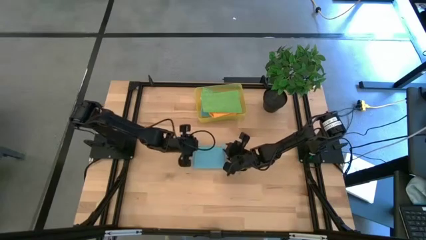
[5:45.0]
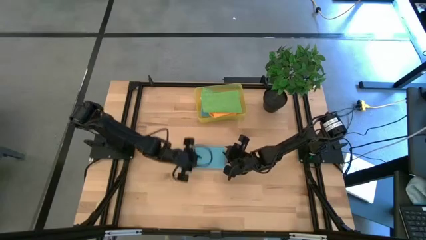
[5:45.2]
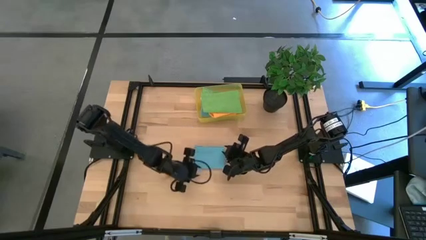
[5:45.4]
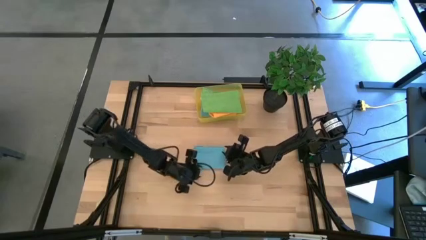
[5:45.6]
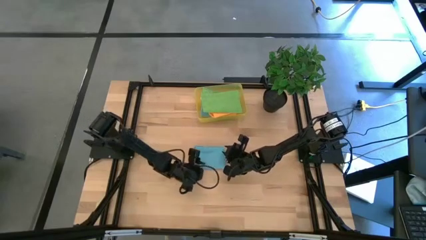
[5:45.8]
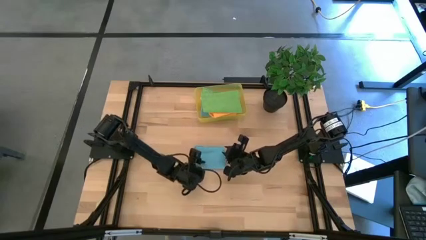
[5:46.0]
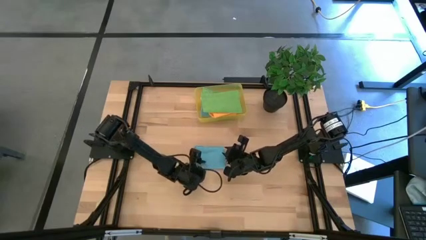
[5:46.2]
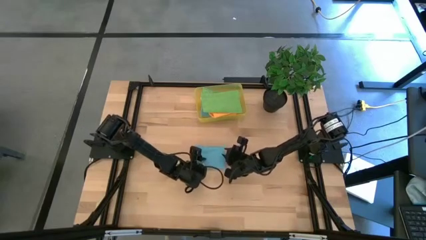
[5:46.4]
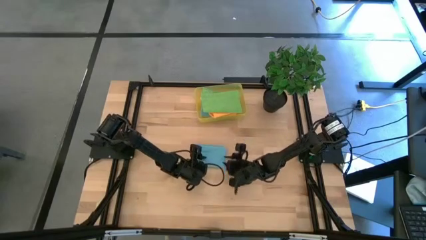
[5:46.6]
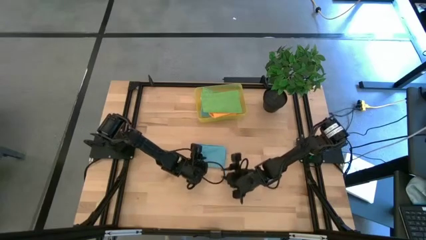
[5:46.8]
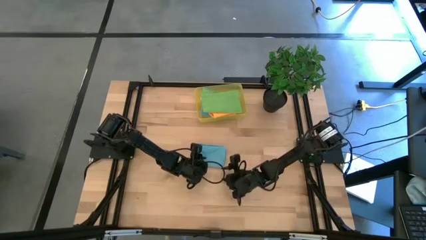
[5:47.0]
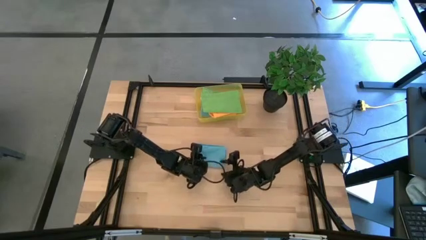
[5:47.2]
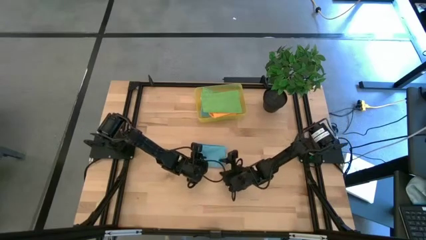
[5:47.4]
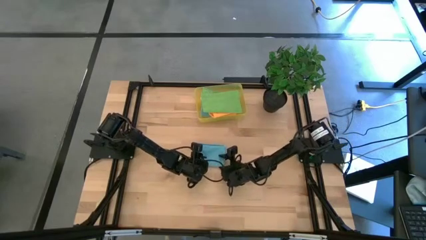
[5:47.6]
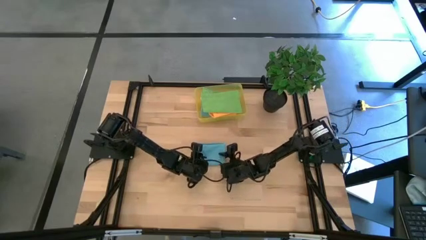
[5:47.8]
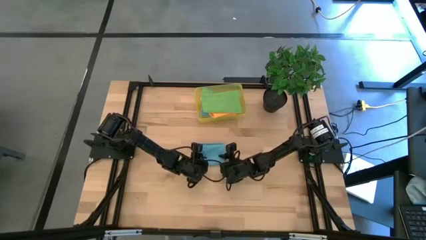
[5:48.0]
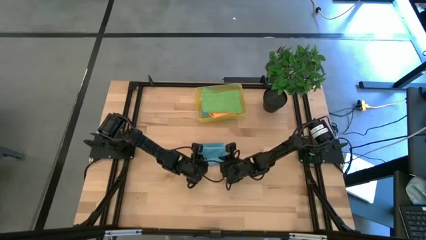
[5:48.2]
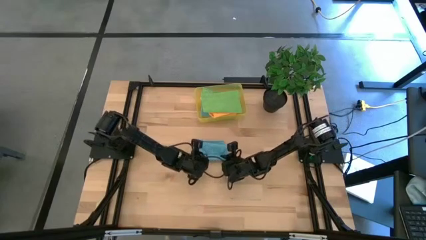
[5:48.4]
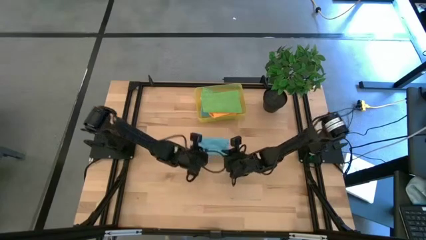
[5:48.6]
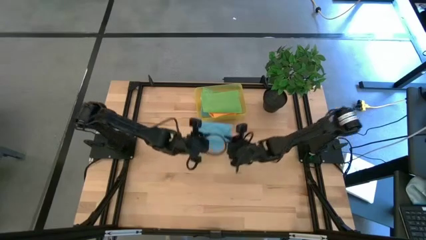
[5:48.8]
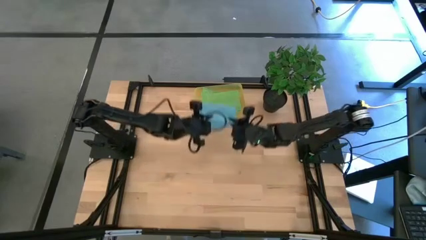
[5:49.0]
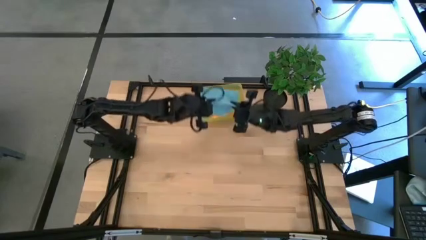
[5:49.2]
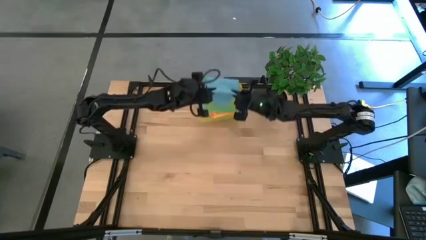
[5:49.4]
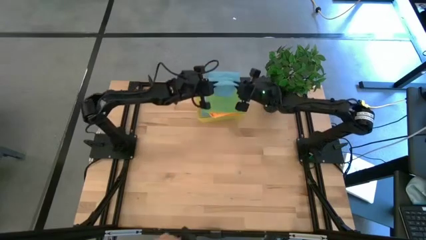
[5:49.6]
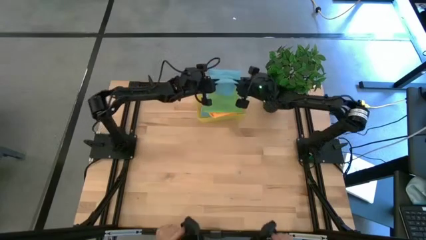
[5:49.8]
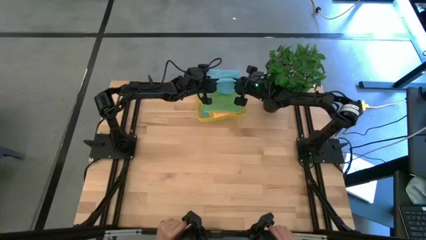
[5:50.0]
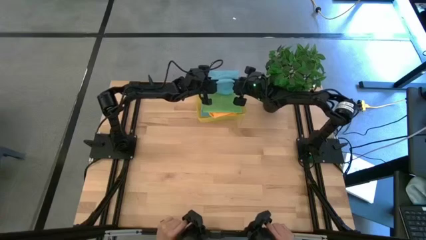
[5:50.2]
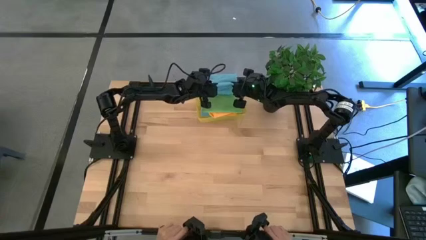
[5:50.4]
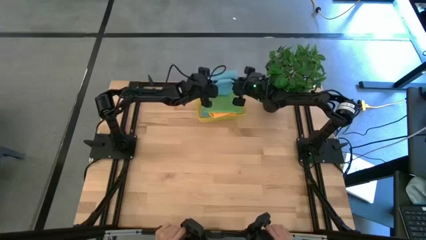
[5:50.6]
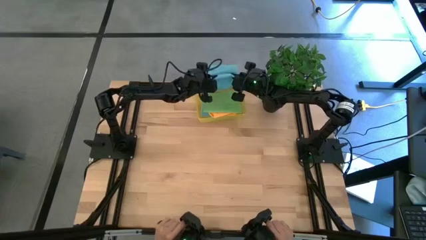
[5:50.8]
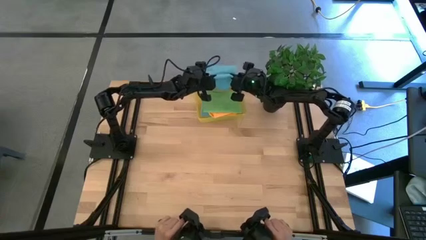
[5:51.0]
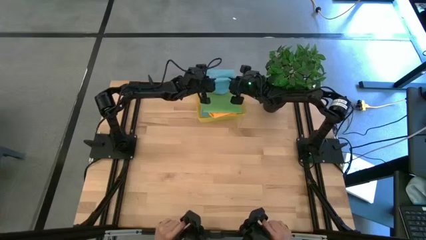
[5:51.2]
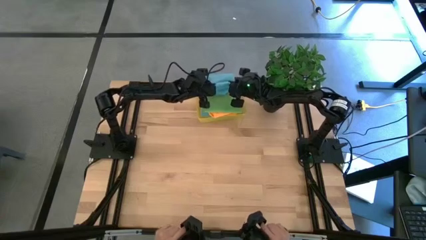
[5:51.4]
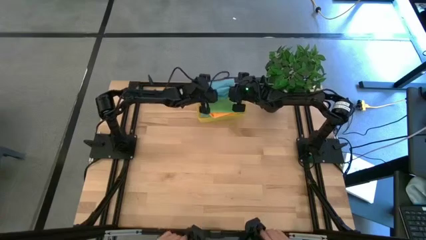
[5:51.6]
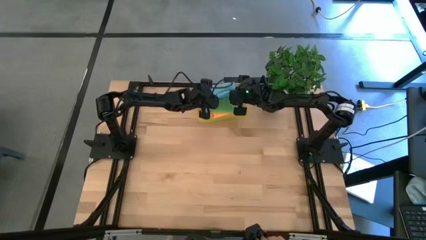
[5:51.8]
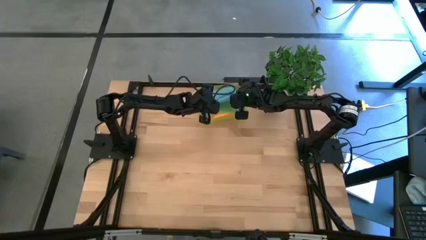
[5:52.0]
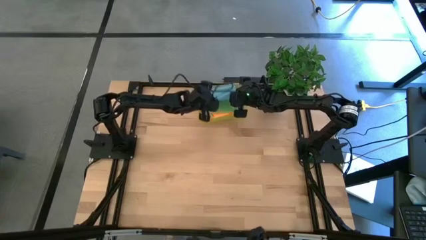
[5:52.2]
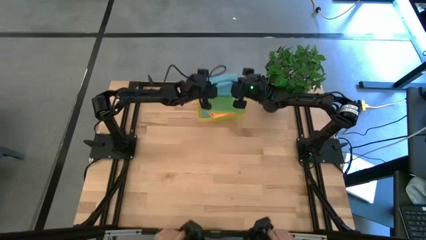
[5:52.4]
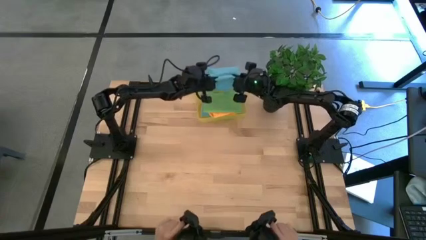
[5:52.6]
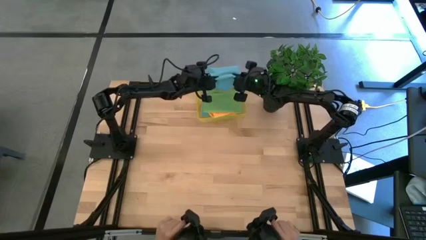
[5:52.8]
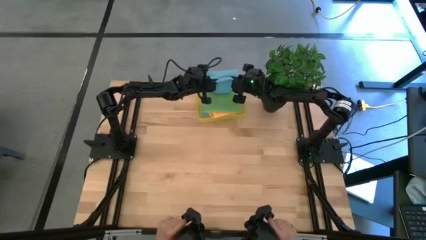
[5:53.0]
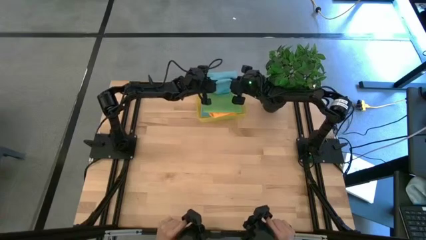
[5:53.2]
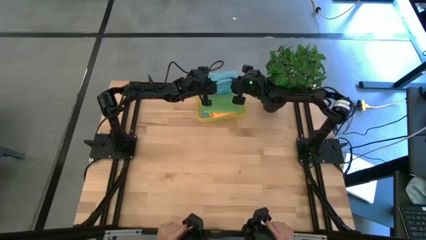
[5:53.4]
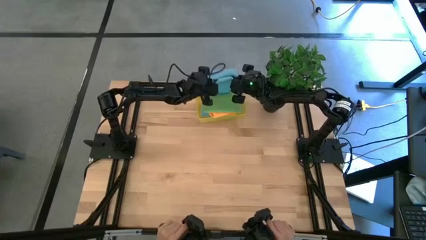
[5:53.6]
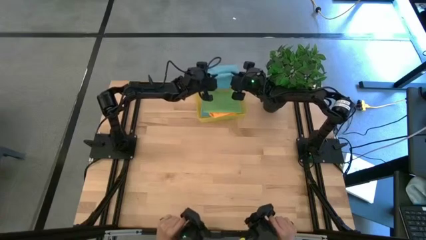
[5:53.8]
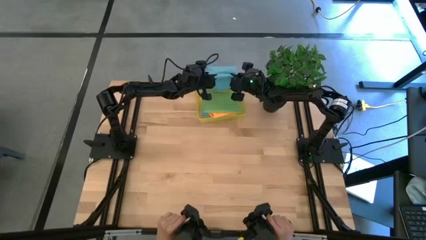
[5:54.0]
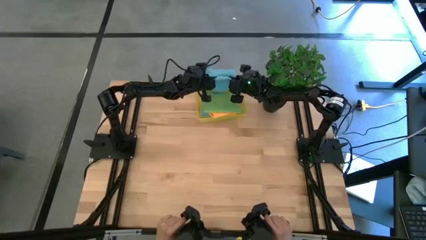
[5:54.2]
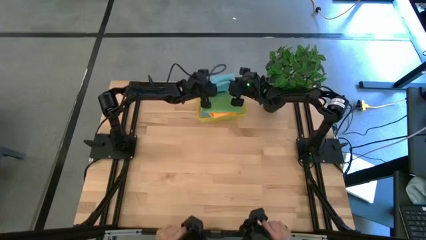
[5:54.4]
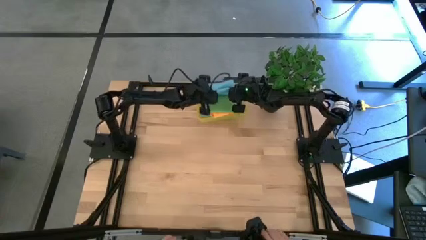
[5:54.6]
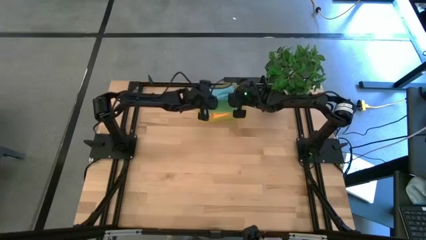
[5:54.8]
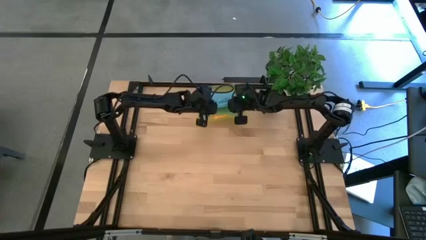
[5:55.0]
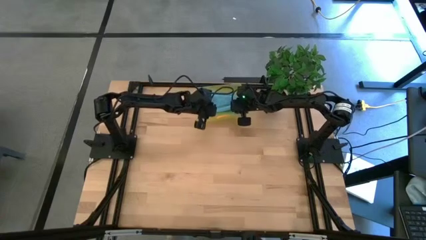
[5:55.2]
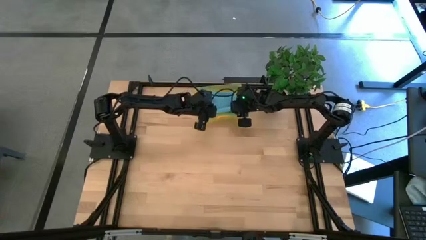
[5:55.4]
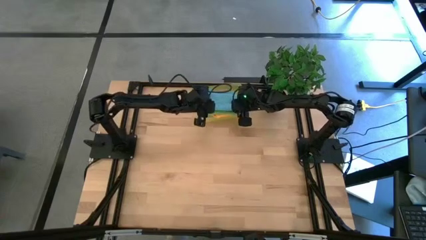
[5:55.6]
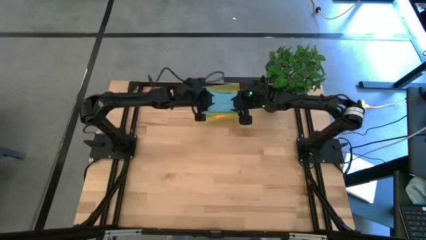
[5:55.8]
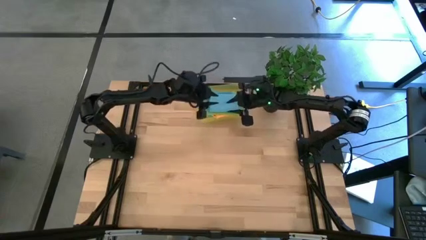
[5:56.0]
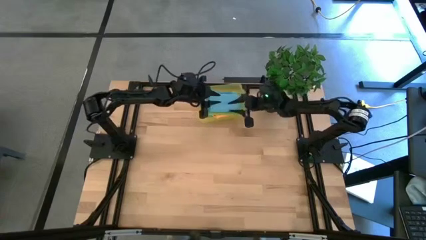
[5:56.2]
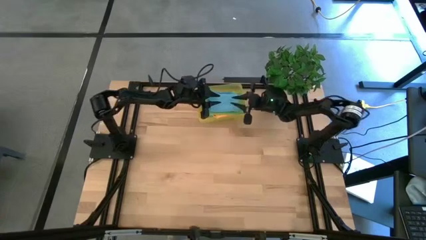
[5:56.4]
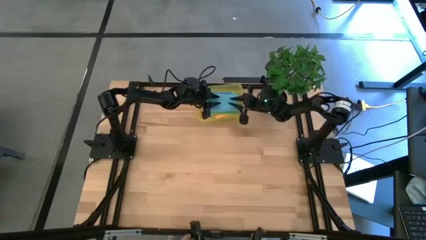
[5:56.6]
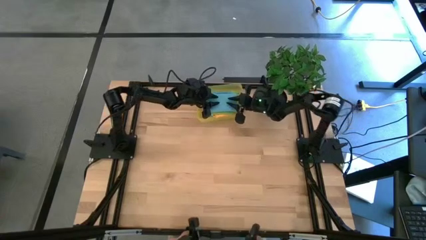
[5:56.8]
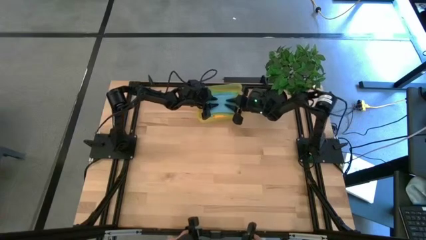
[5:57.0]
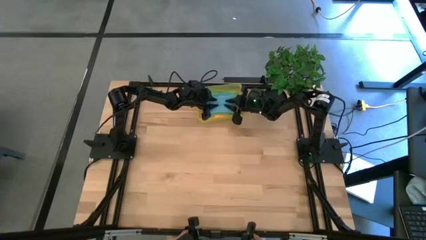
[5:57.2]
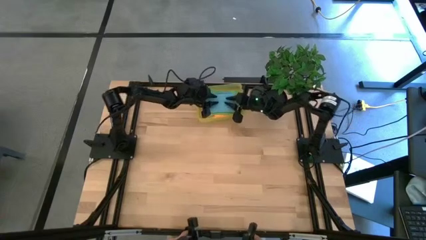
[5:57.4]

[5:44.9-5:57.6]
Task: Fold microfiber towels
Stack the folded blue microfiber towel on top of the green microfiber towel in the bin

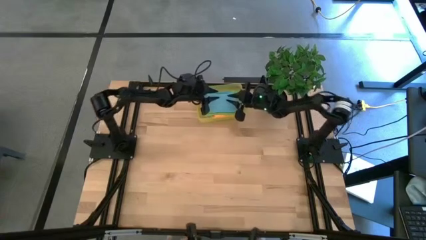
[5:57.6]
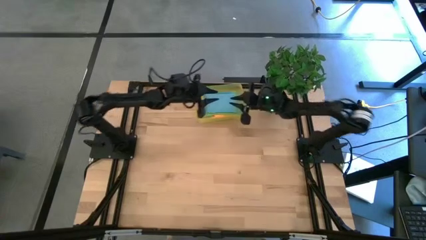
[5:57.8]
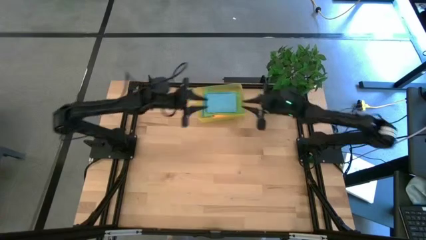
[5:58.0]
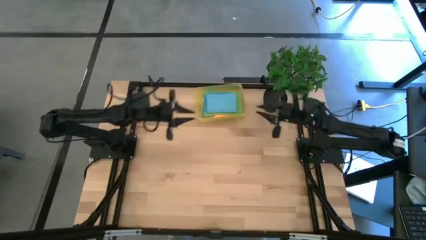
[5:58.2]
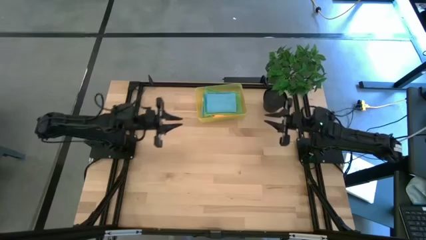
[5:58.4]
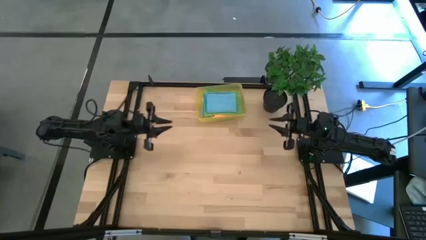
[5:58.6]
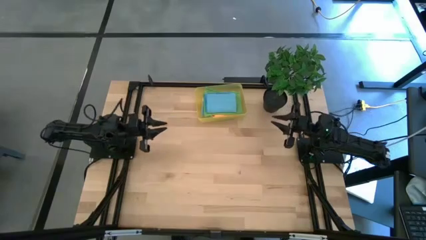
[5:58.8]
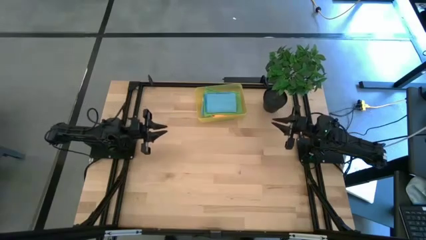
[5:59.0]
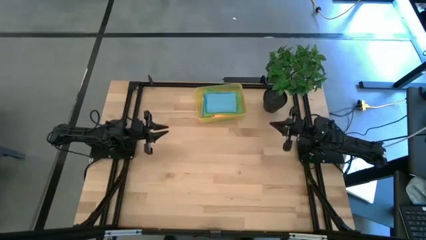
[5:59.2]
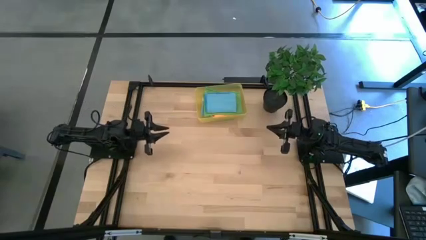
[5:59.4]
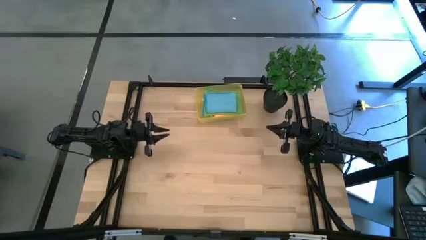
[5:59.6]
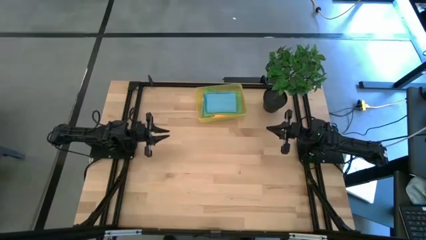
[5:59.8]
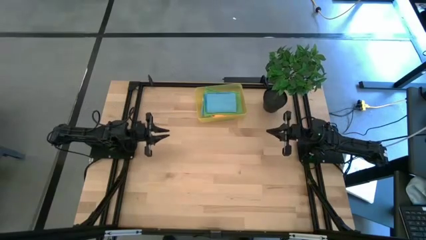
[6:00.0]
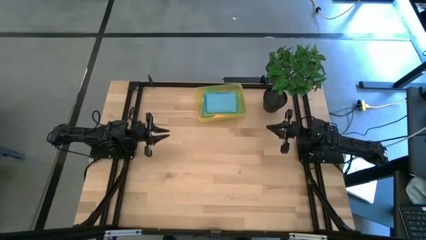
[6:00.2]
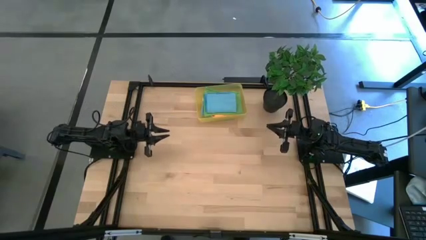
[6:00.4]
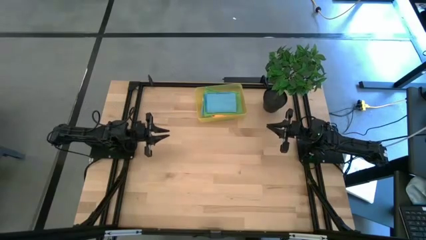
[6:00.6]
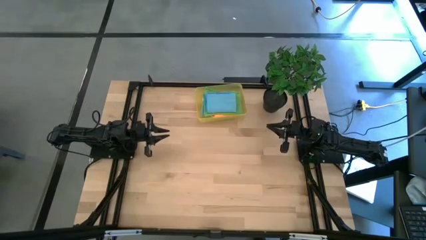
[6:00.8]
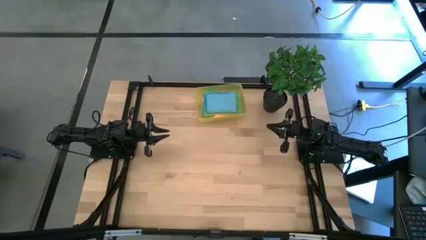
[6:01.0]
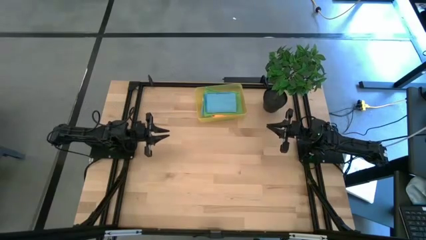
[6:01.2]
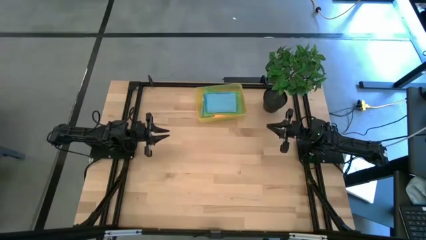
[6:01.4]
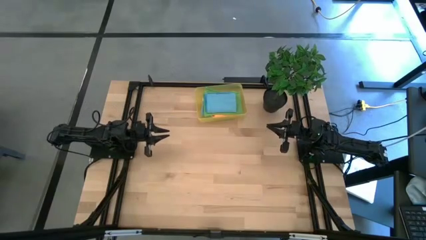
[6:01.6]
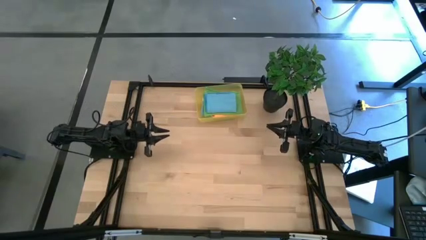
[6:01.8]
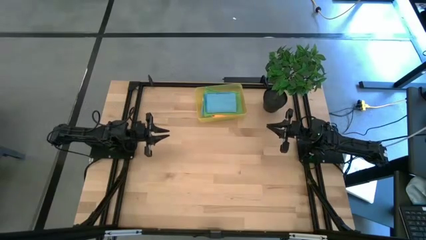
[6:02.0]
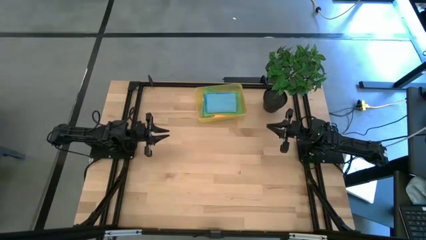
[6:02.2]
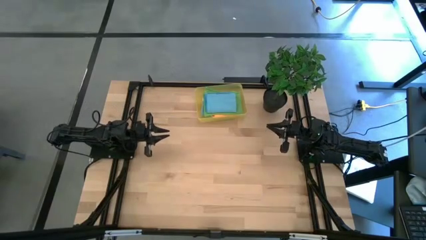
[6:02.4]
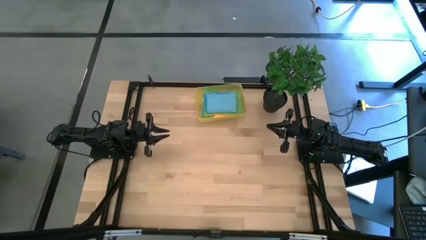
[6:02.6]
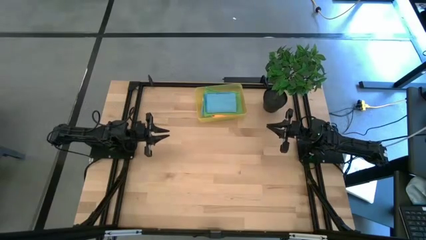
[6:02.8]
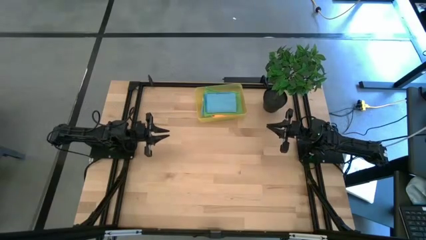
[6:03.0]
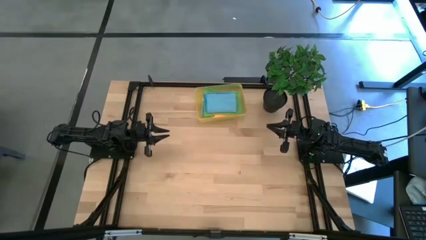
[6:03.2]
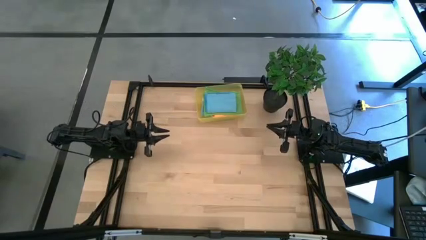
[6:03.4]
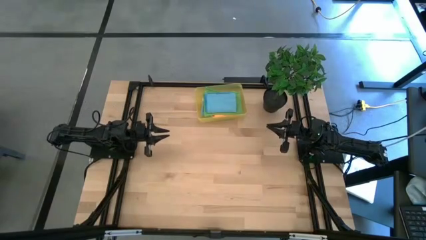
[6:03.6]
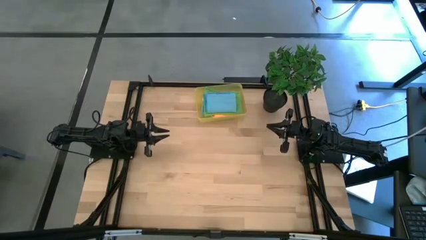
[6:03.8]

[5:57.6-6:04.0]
Return to Home Position
